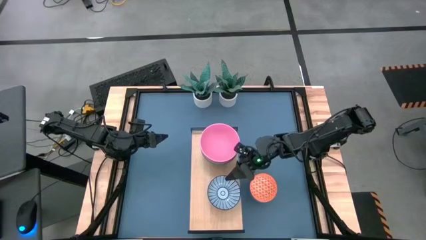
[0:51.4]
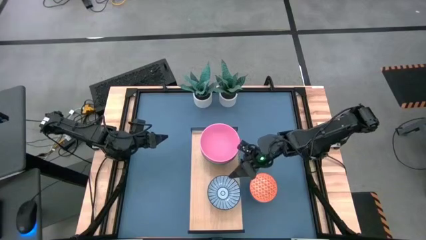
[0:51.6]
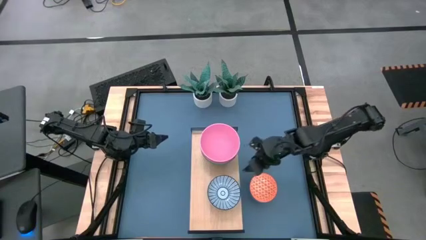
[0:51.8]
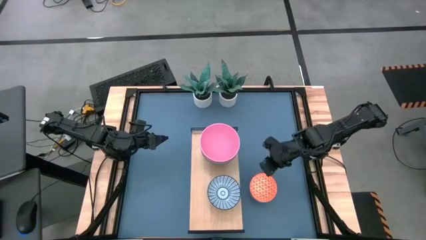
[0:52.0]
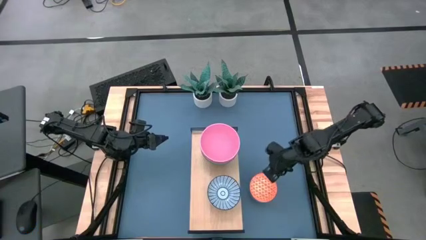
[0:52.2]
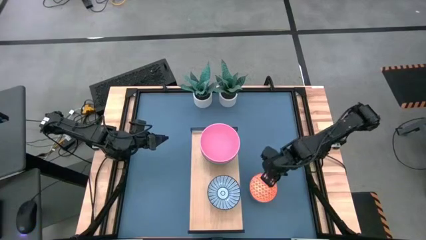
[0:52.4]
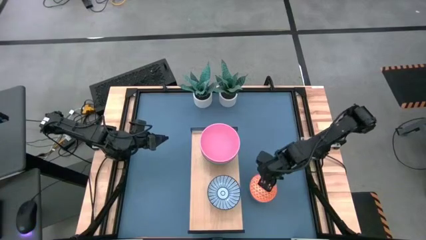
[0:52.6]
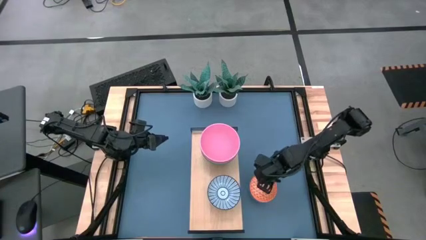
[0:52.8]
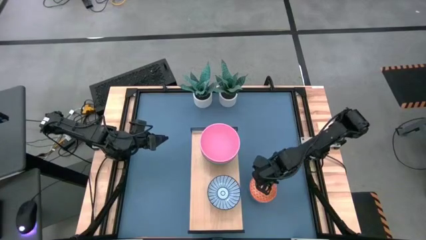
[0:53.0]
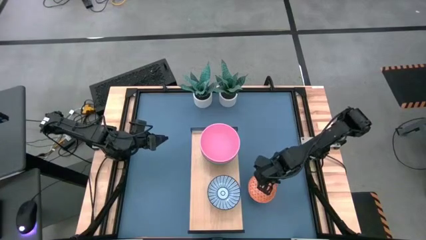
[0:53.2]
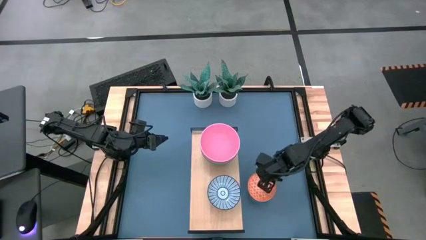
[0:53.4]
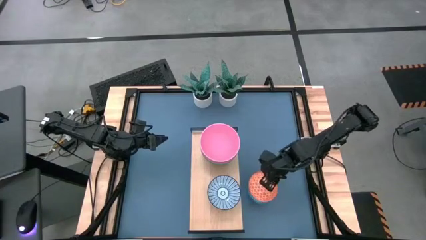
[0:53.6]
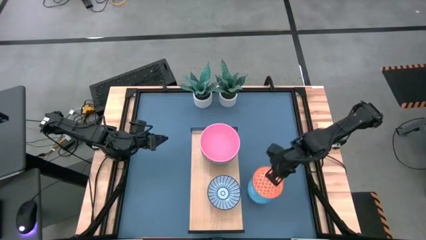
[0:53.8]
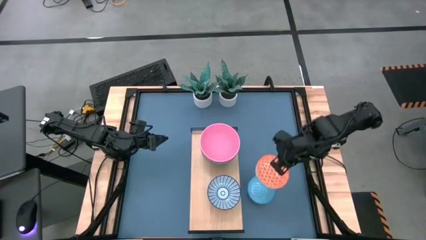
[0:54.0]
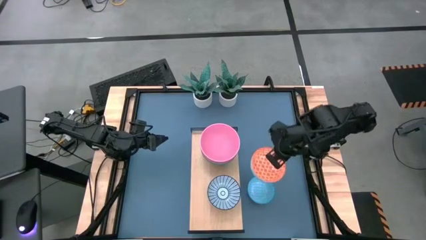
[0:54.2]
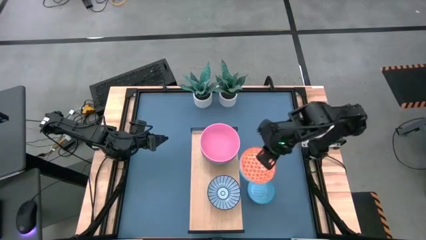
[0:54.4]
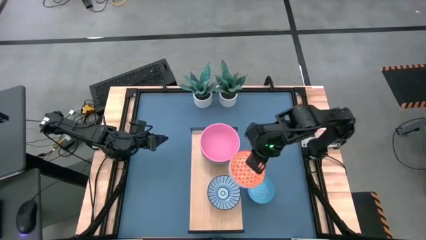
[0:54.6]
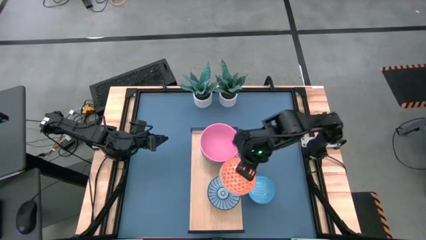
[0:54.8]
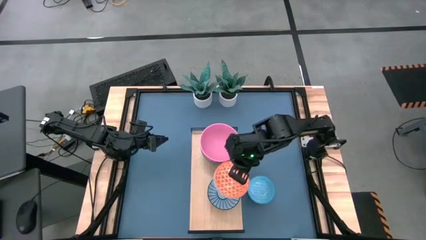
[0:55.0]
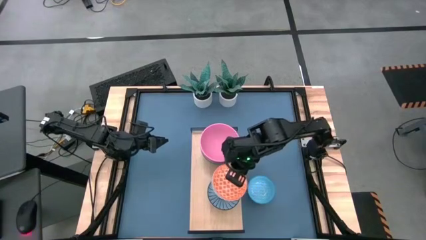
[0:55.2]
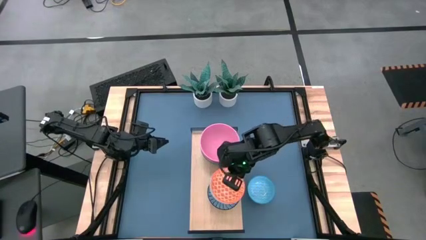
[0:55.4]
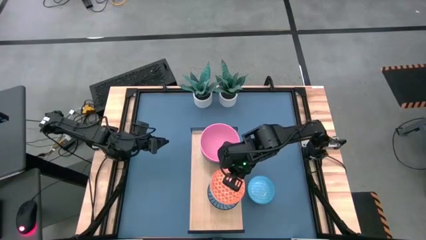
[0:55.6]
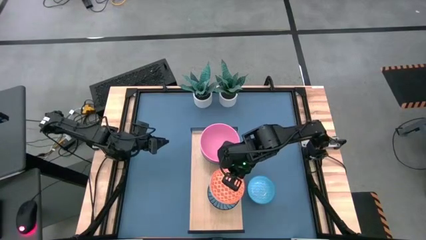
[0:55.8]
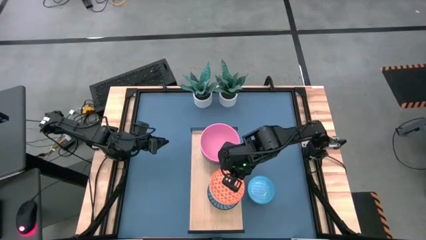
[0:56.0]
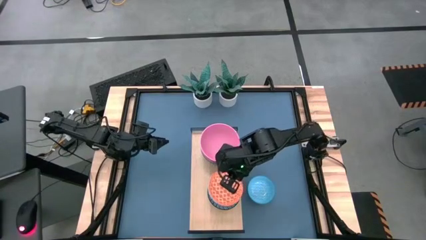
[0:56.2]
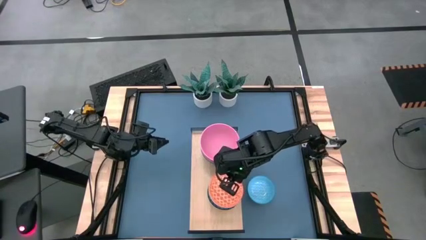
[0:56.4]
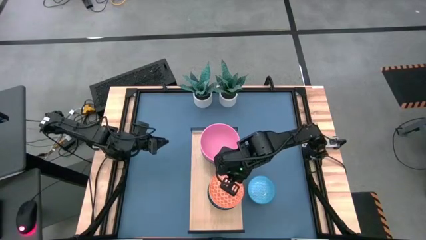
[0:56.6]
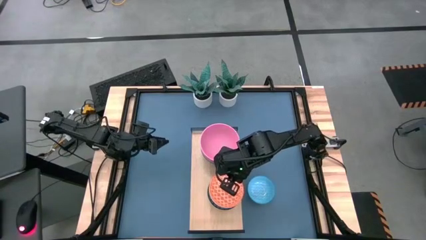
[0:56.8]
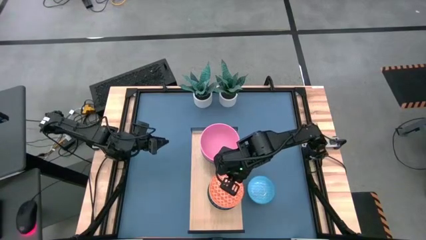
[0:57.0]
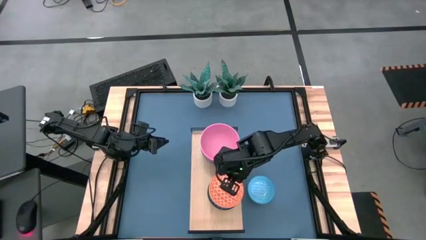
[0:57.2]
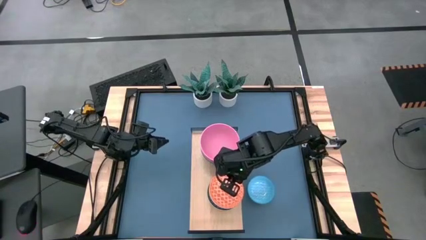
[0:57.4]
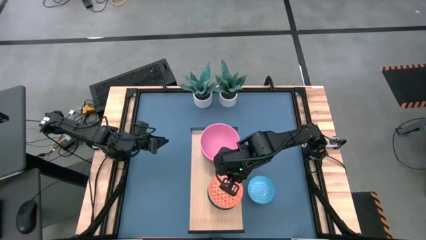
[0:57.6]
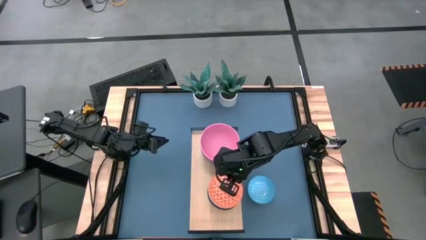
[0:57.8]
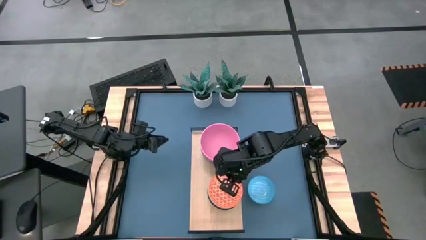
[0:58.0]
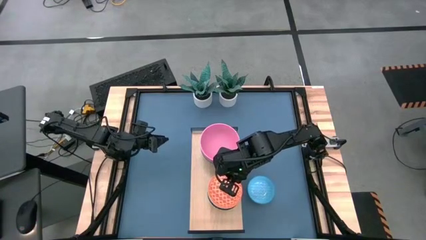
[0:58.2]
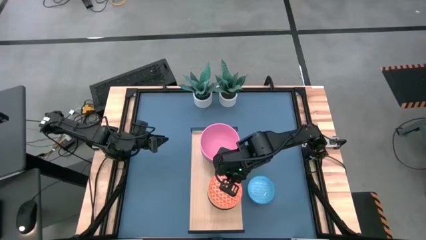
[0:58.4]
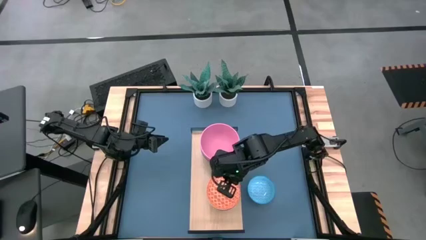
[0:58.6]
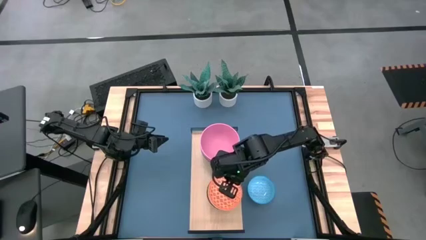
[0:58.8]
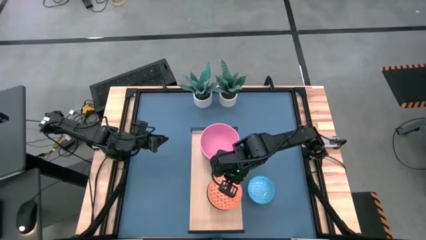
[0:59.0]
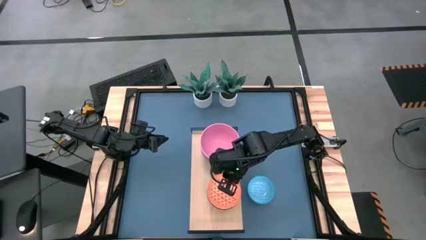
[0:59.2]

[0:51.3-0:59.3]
Task: Place and stack bowls onto a shelf
Stack the orange patterned bowl on top of the blue patterned bowl on the shelf

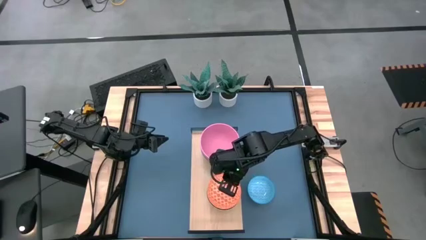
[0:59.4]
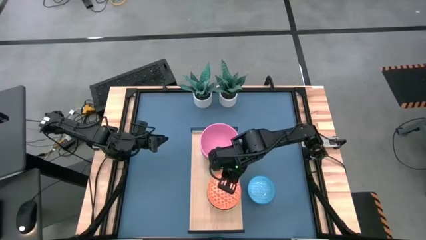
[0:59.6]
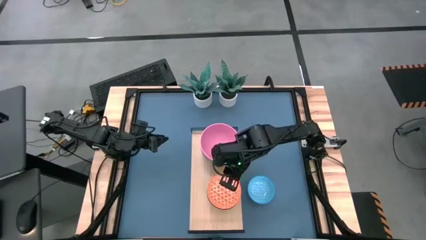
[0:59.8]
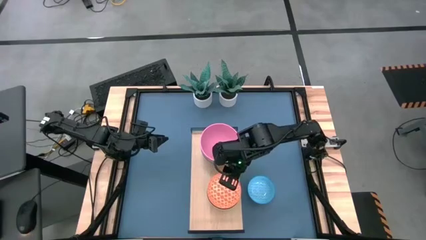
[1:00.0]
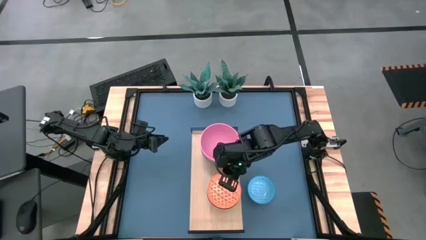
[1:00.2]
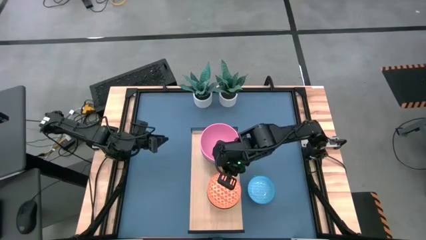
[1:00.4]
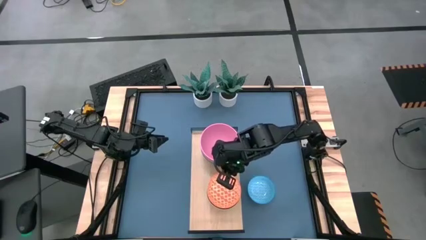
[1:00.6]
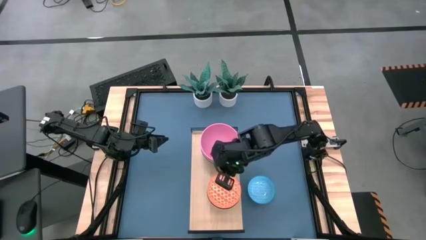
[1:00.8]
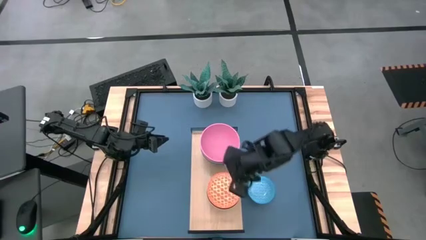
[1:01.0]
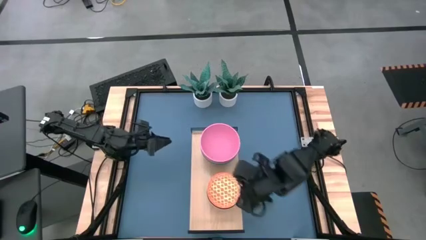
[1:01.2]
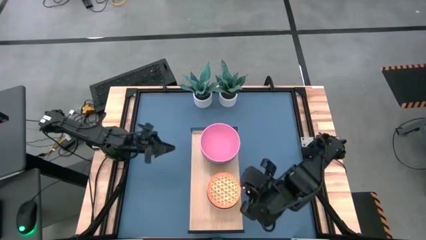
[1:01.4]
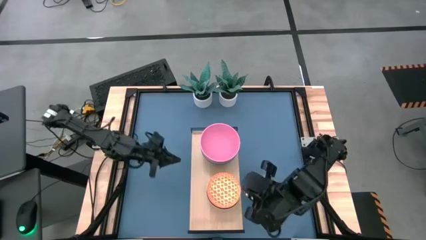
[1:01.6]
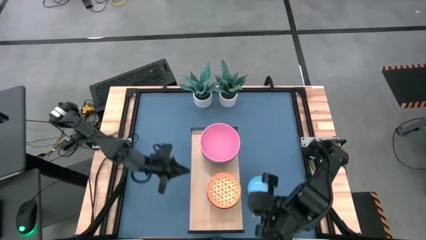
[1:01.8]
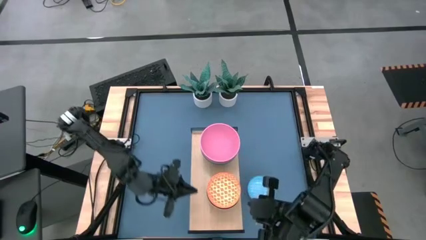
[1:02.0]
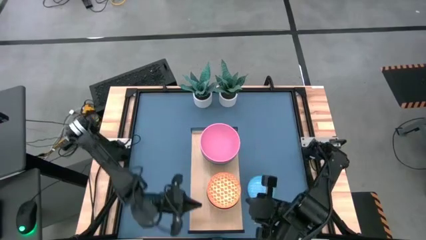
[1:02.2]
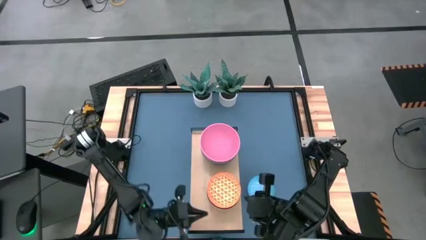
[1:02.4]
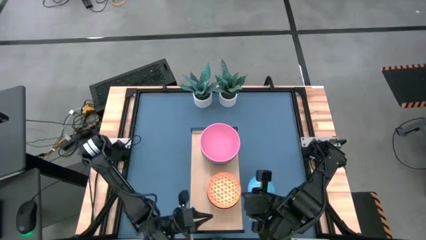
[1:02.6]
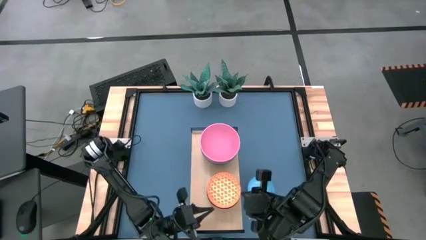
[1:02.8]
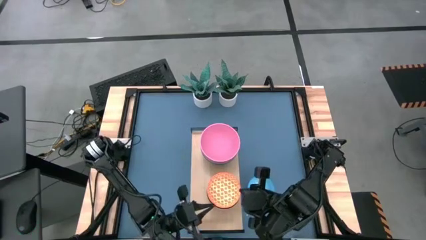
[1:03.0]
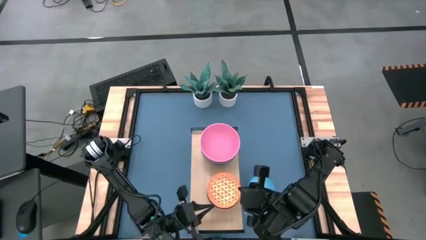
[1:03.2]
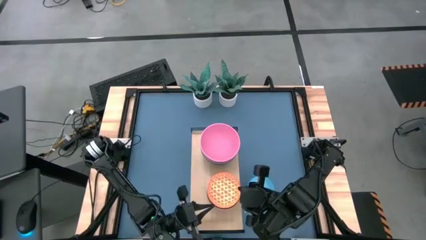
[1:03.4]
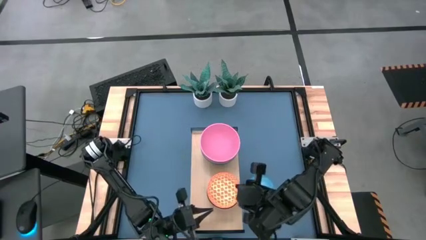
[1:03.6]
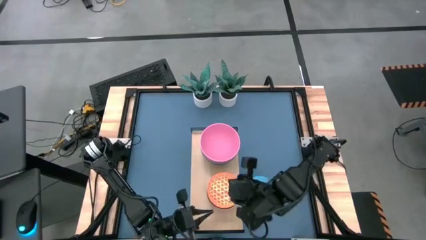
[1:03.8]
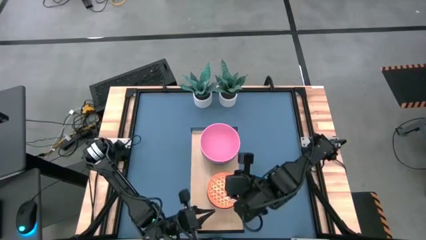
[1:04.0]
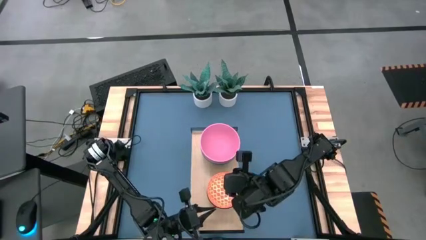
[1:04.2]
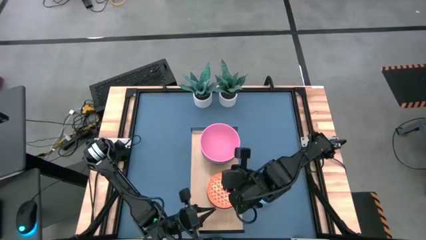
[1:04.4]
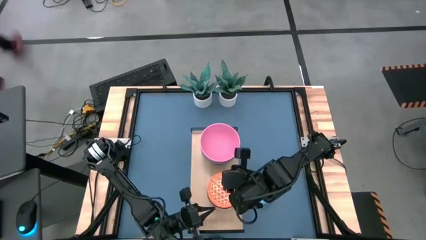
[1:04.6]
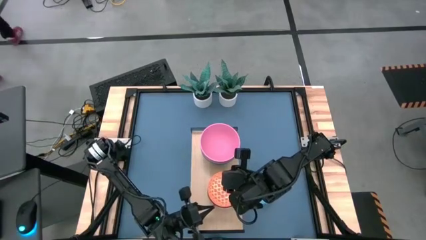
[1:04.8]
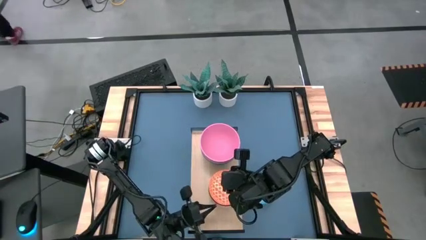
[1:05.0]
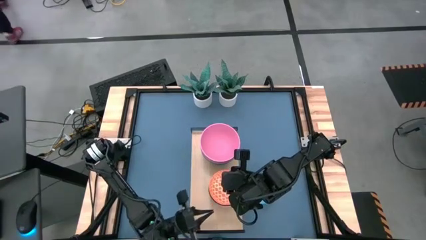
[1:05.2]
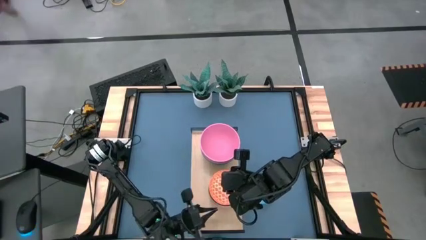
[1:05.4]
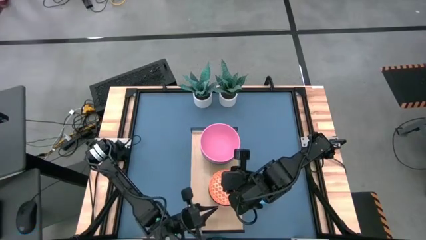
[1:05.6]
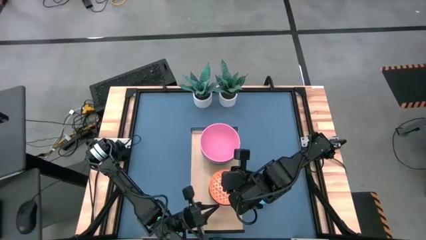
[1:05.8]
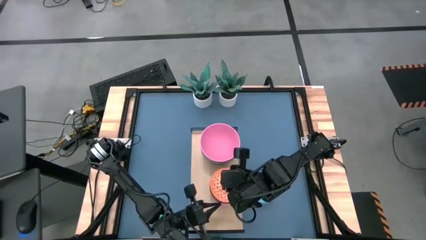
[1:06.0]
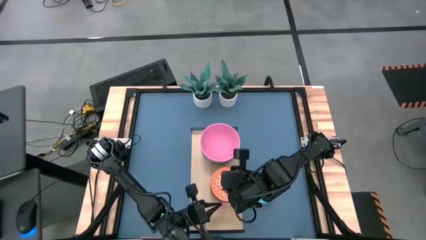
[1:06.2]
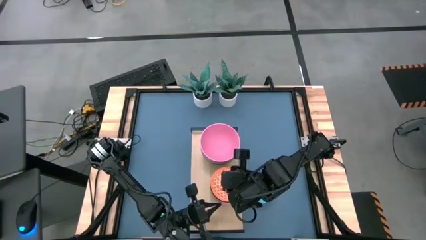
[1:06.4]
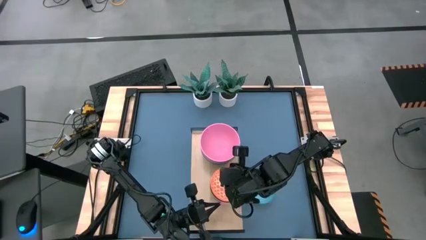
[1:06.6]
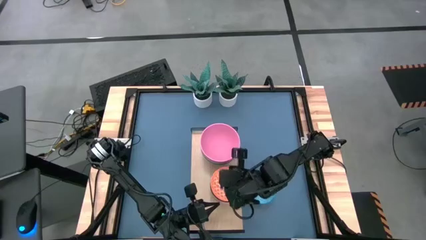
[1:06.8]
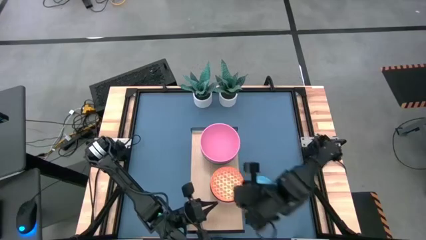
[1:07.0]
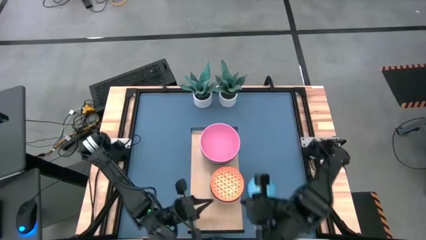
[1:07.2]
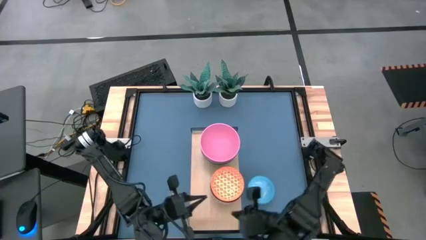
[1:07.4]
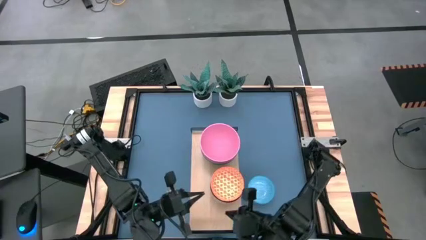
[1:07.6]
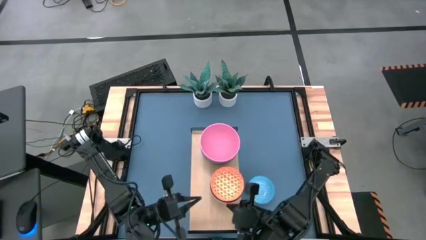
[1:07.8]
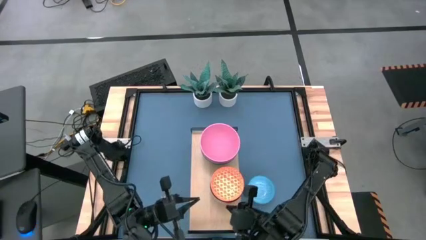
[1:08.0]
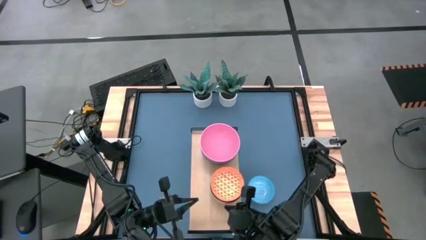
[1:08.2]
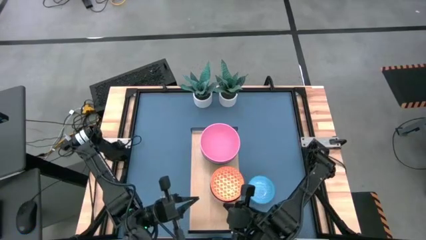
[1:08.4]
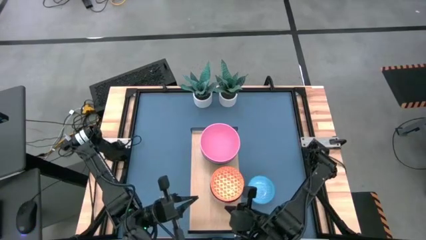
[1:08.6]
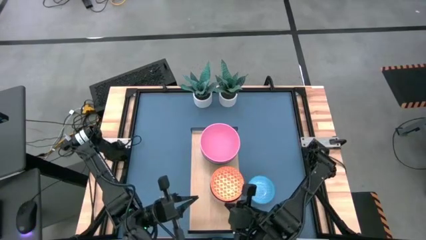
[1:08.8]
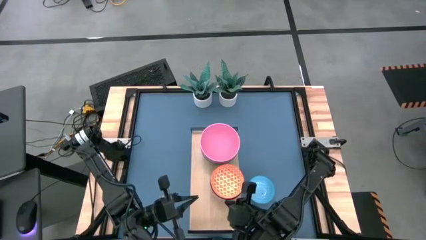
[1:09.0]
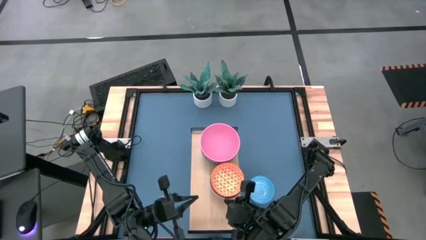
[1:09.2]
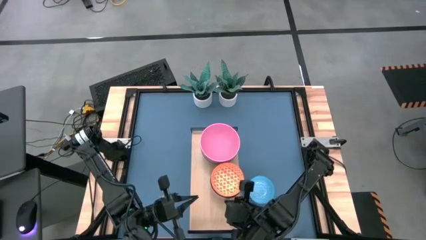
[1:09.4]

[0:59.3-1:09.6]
Adjust the orange patterned bowl
